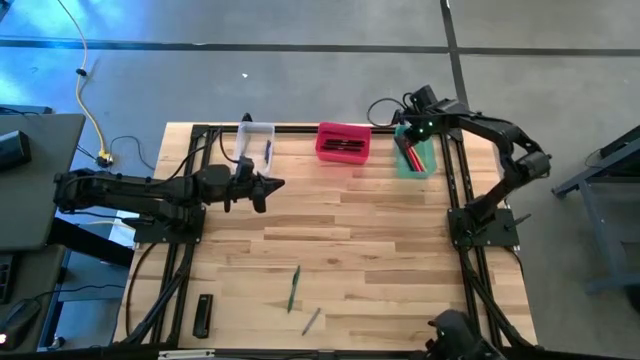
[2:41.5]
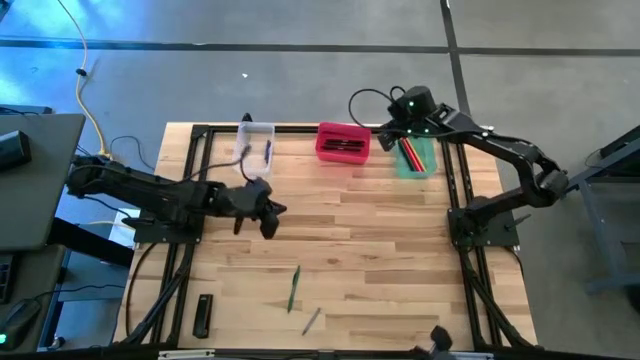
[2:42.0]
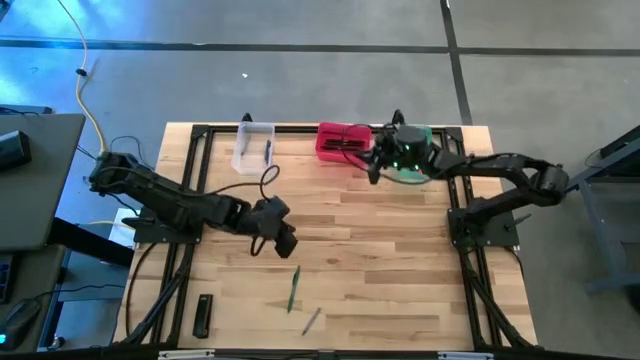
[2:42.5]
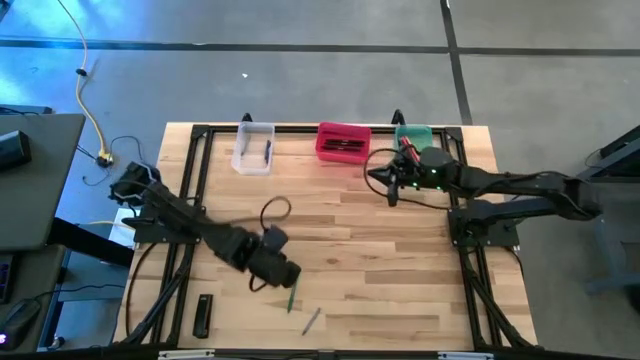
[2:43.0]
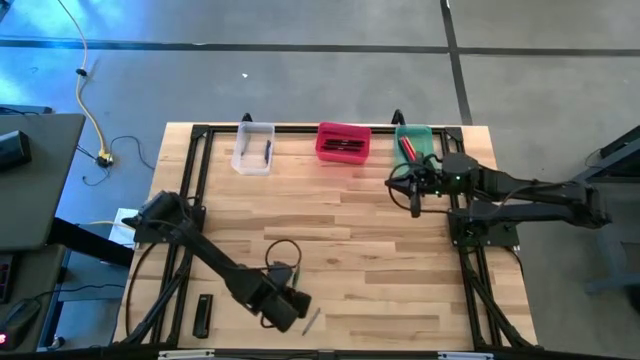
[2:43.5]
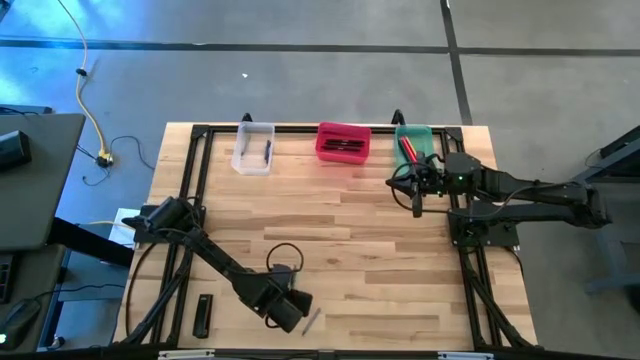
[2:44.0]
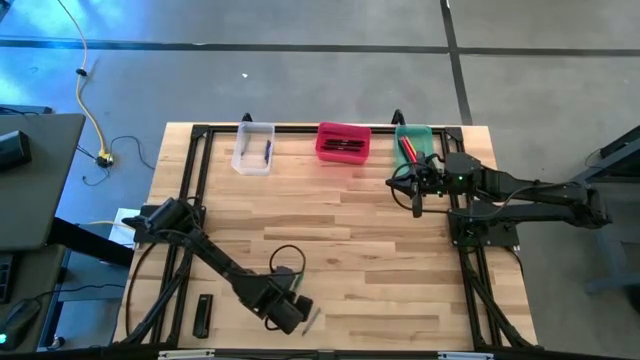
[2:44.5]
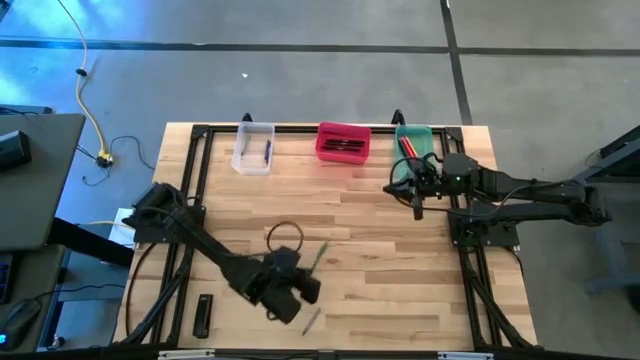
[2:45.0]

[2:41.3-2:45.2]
Task: Sort crayons/erasers/pens/pencils in bins
Put the green pen into the red bin

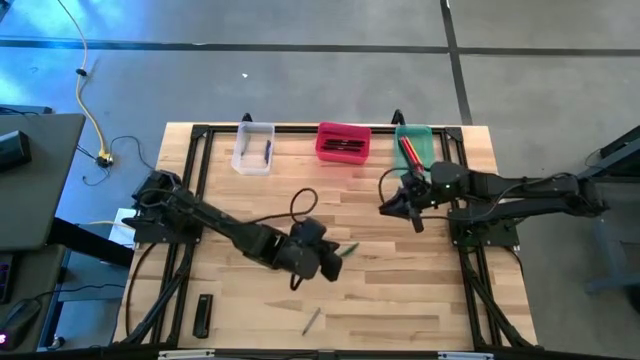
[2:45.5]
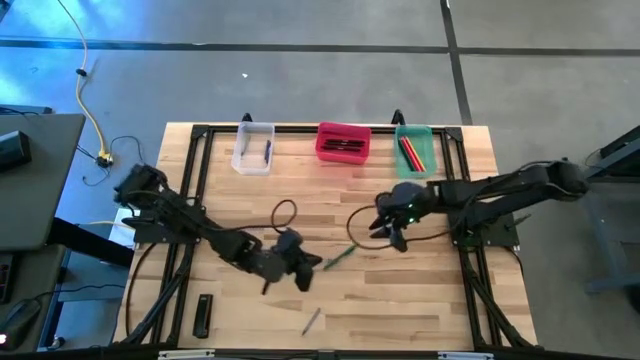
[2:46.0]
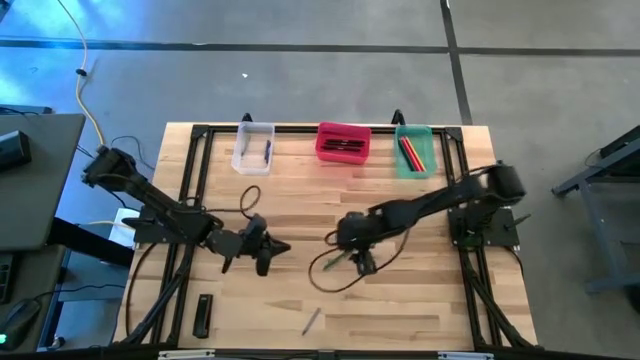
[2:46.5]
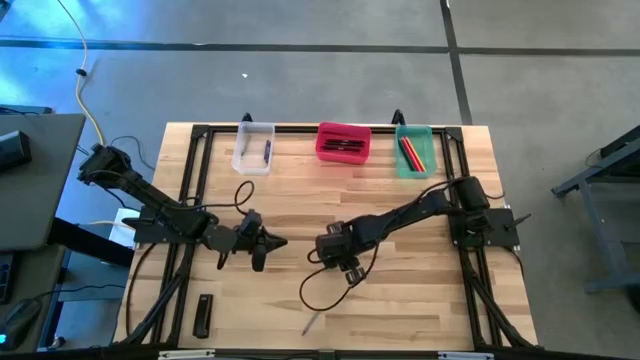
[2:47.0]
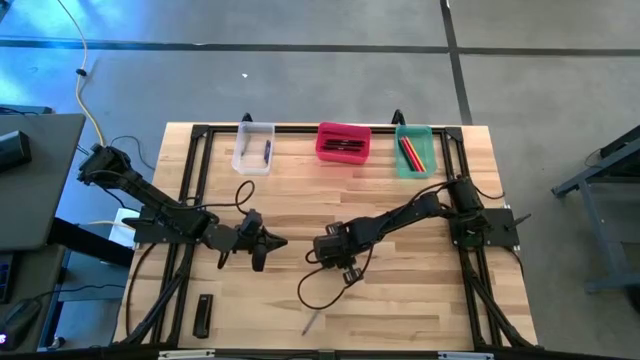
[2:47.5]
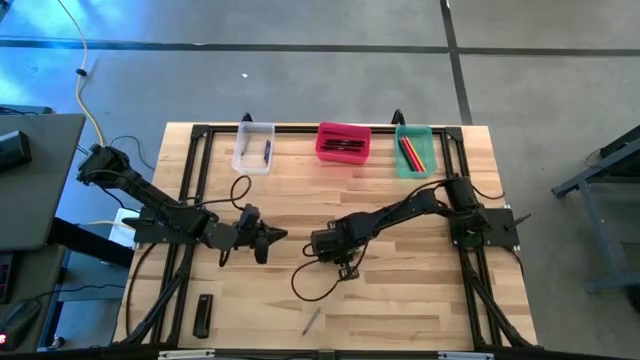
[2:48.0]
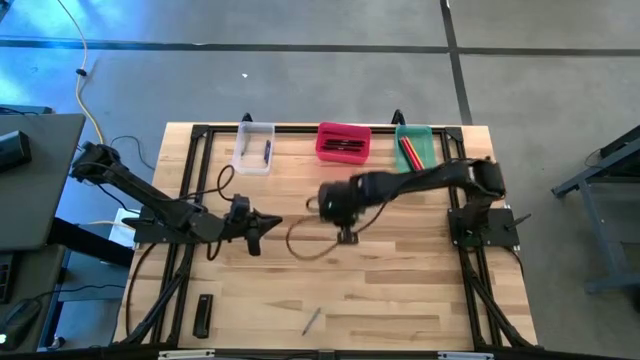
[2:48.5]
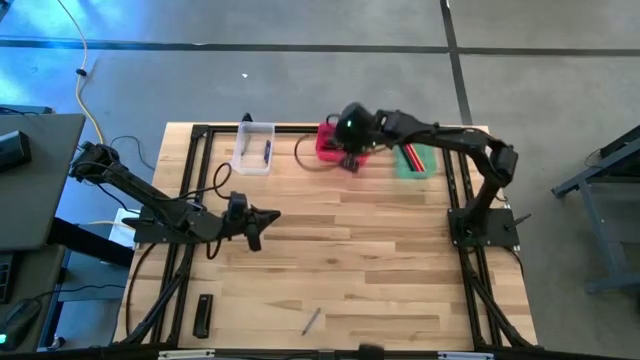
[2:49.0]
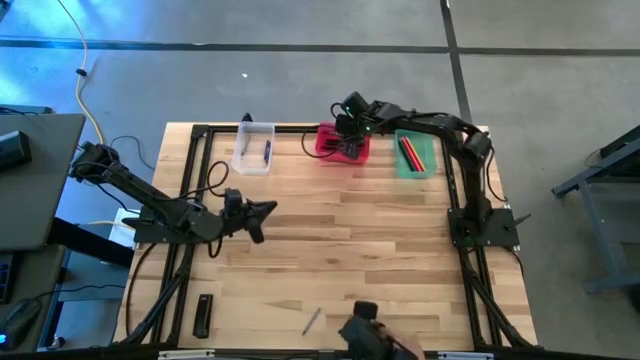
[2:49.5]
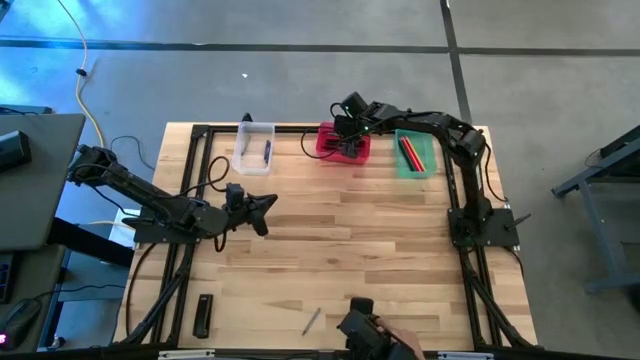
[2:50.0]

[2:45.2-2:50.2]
Put the green pen into the red bin

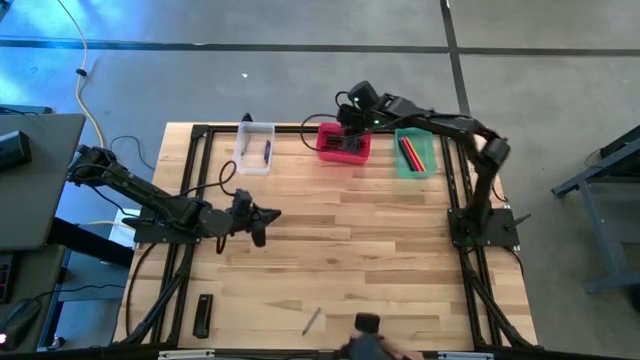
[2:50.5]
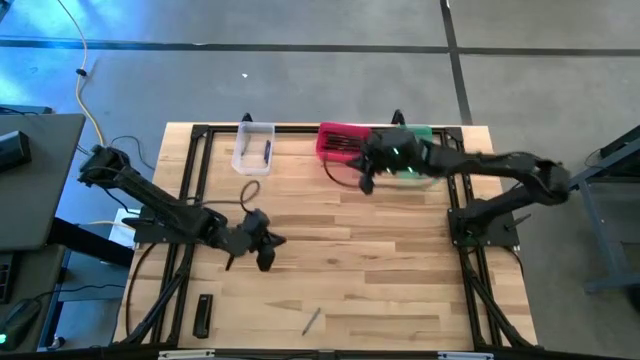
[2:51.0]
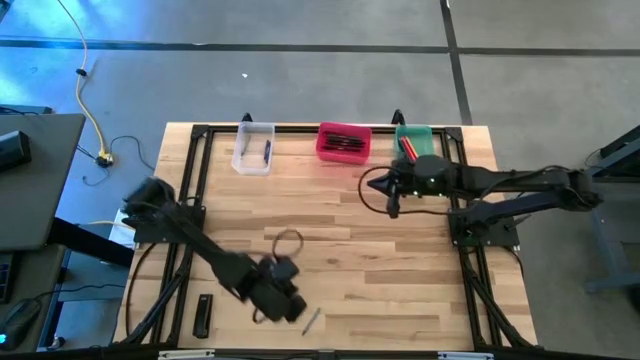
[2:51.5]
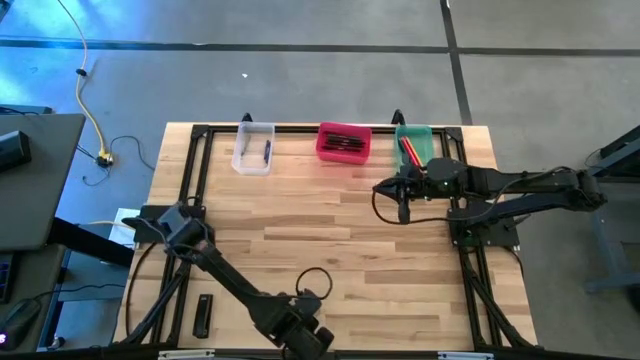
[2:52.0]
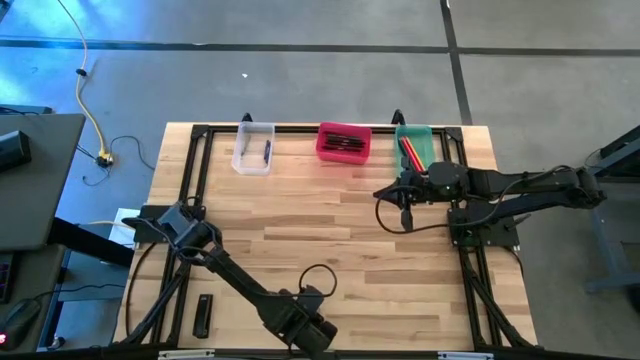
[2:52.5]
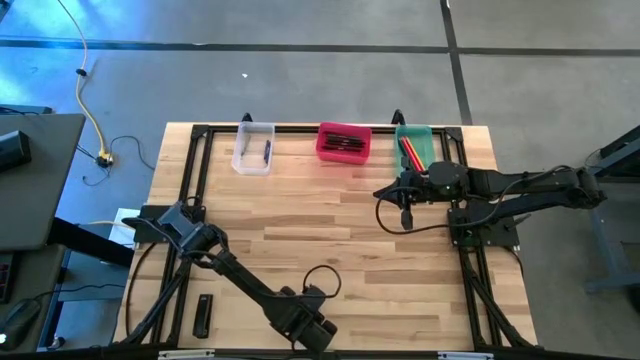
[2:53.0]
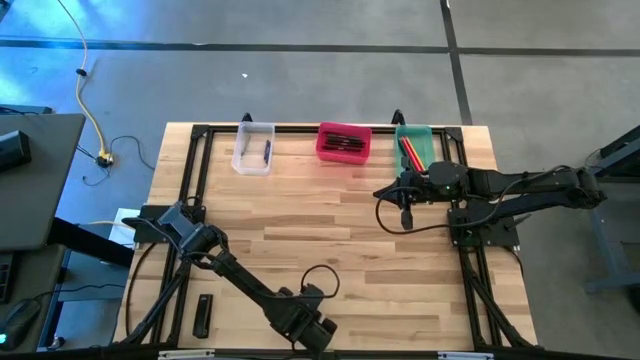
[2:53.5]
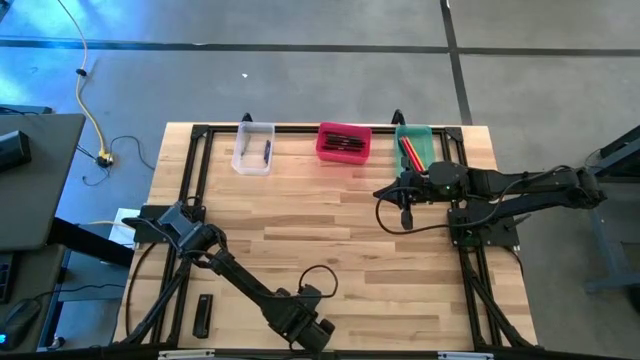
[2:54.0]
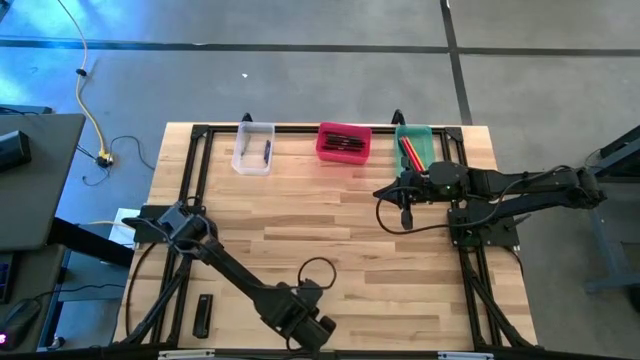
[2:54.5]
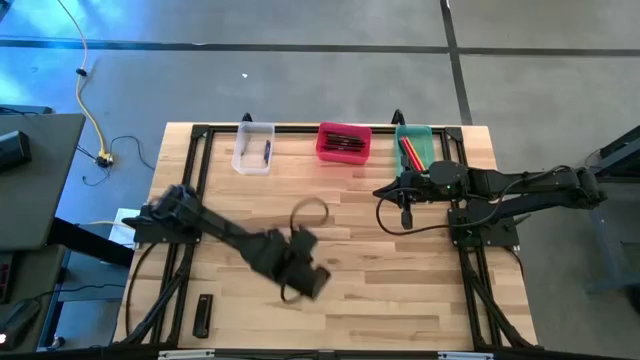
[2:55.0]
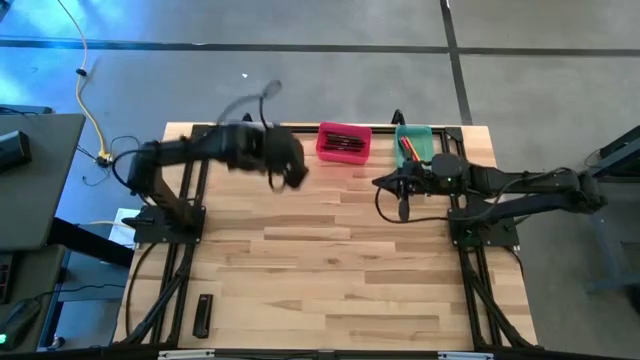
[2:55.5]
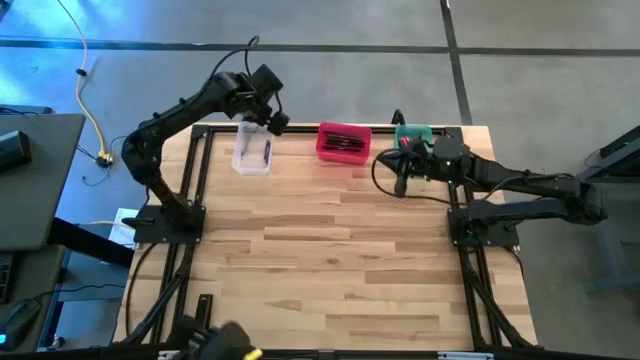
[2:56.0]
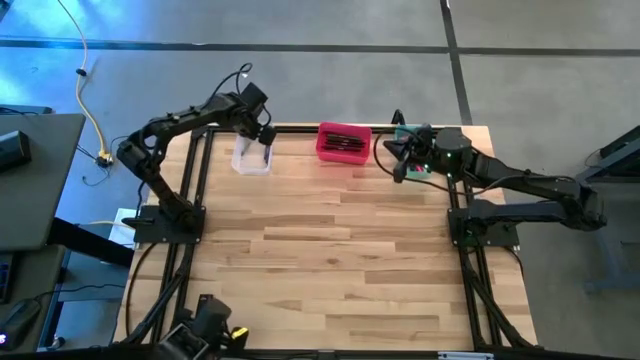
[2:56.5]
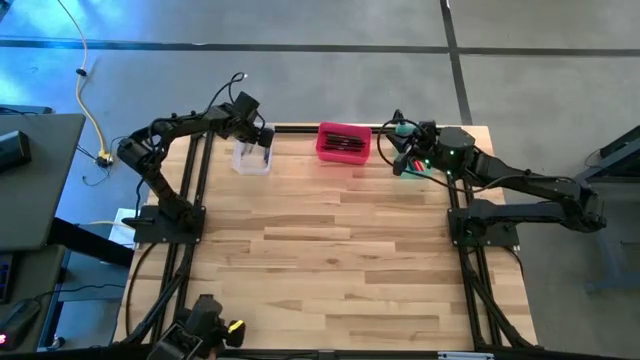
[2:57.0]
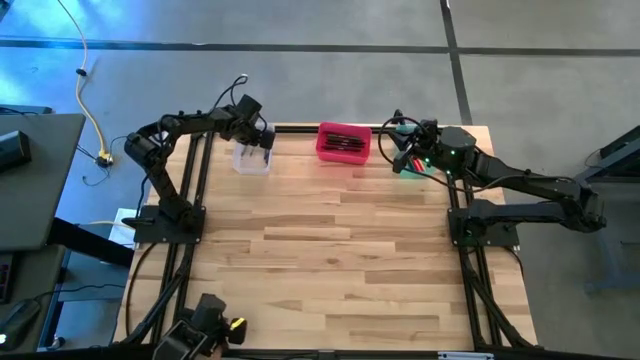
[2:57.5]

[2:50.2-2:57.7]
Put the gray crayon into the transparent bin

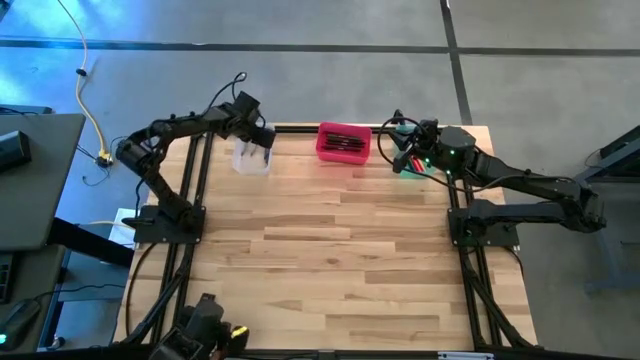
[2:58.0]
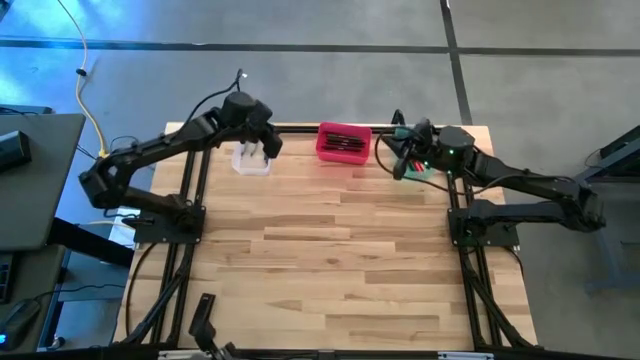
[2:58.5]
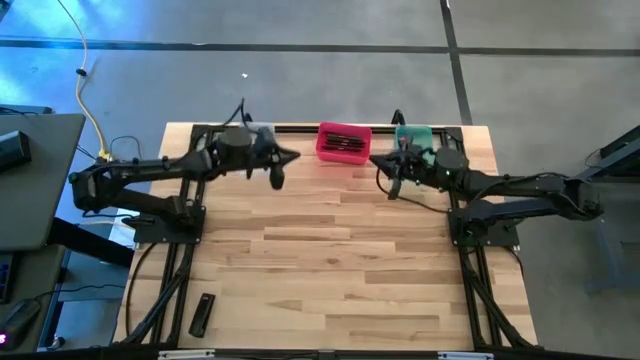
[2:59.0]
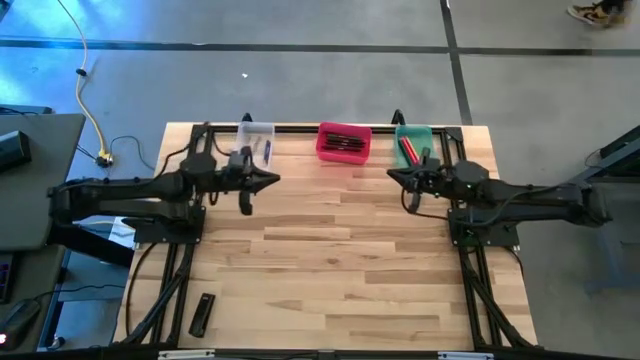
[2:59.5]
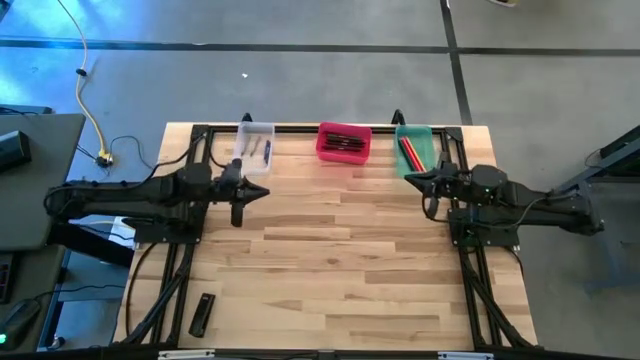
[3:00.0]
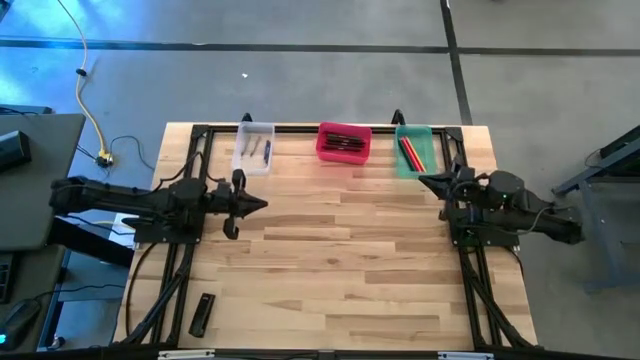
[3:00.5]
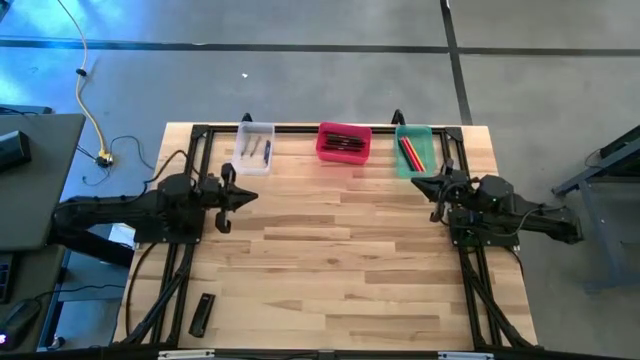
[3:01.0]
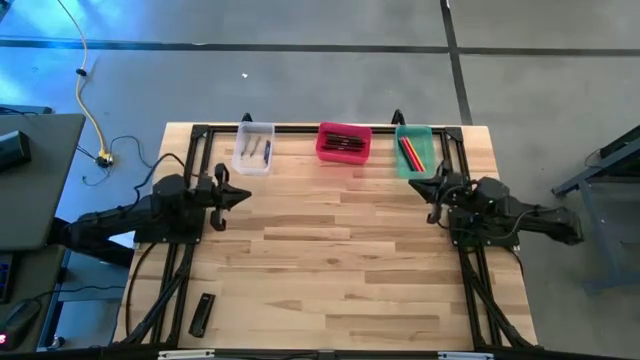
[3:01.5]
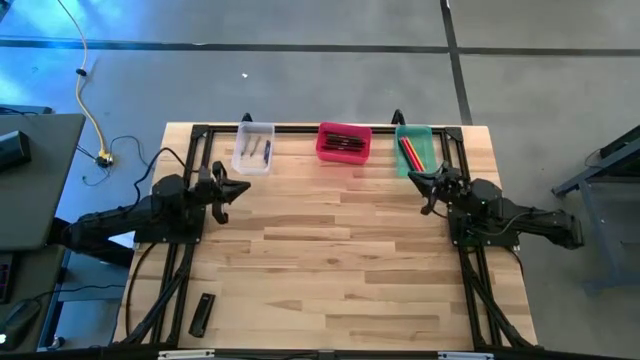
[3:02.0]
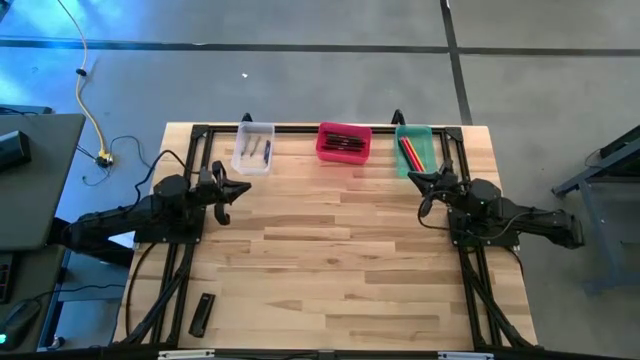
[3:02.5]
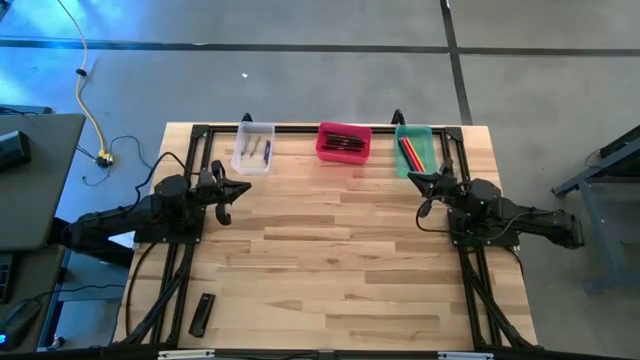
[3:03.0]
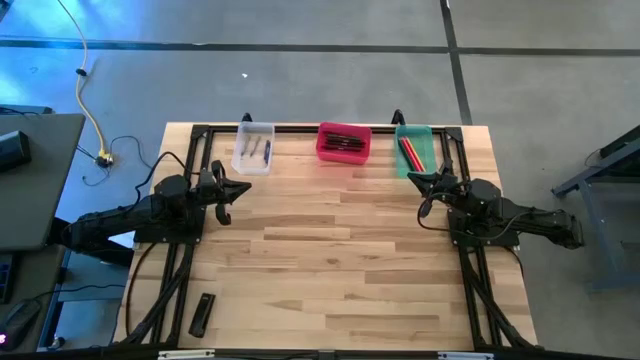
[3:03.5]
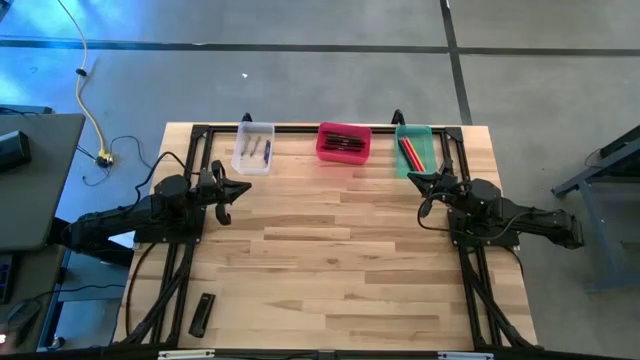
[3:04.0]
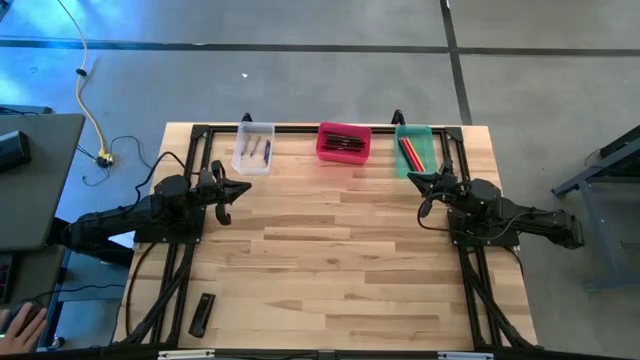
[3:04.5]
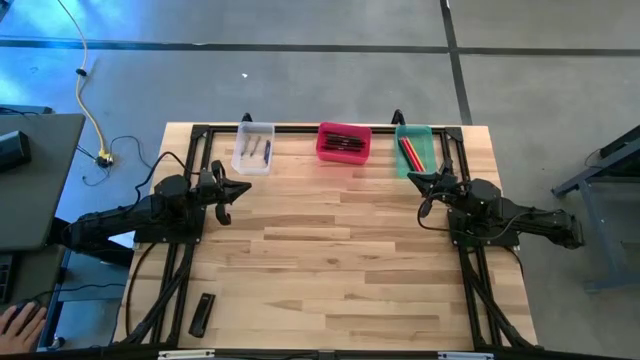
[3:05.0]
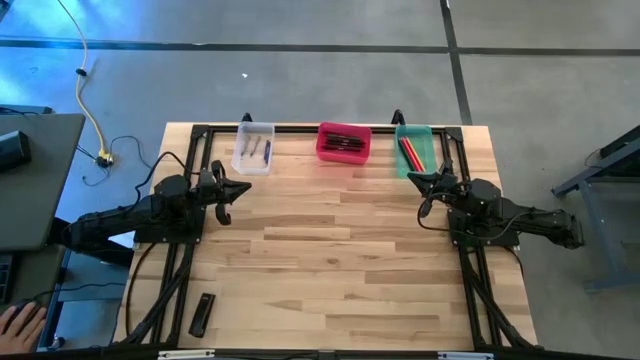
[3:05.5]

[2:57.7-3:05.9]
Return to Home Position
